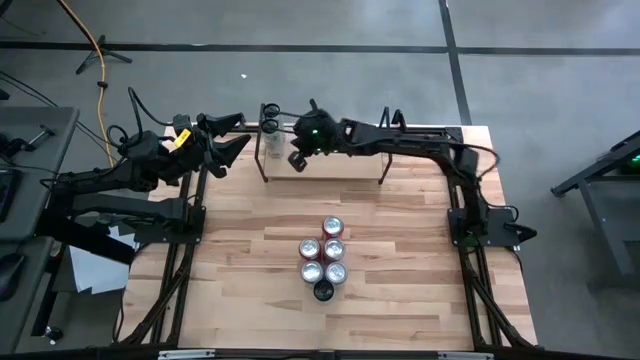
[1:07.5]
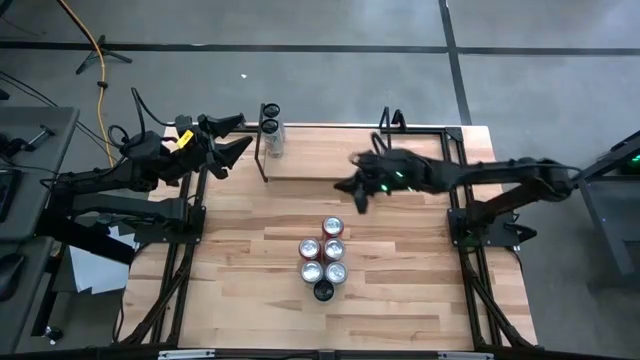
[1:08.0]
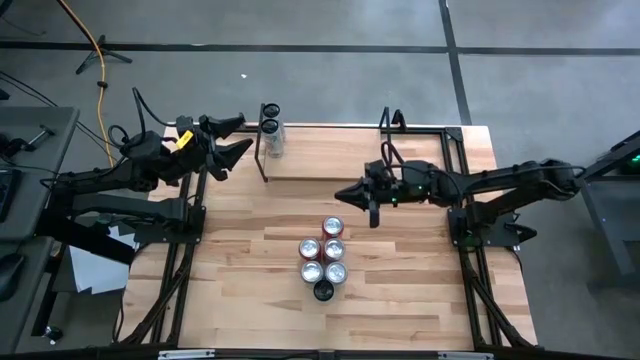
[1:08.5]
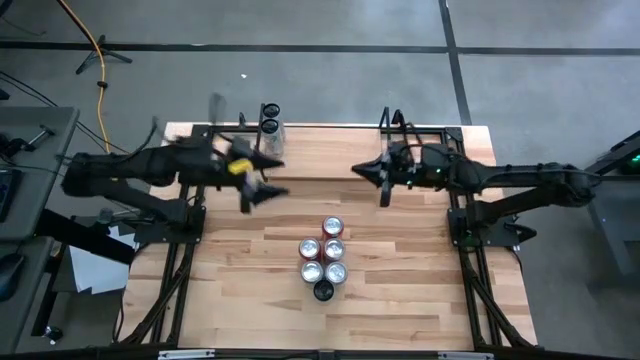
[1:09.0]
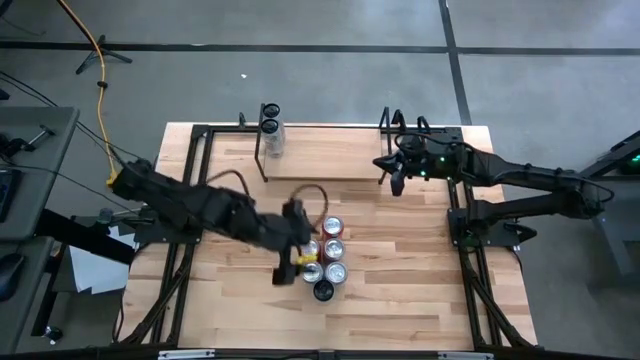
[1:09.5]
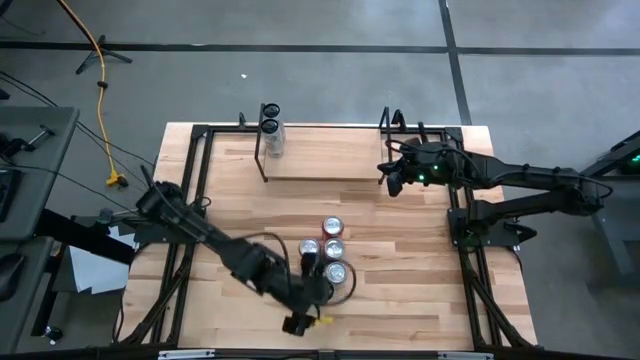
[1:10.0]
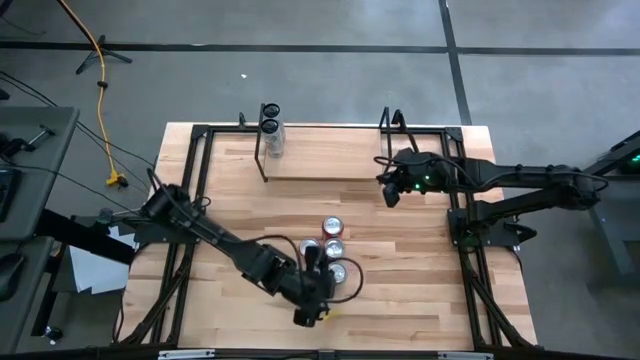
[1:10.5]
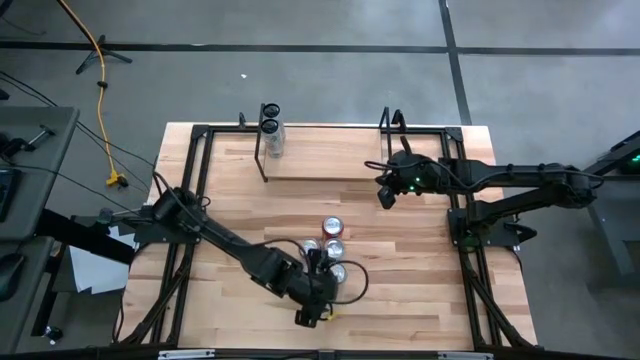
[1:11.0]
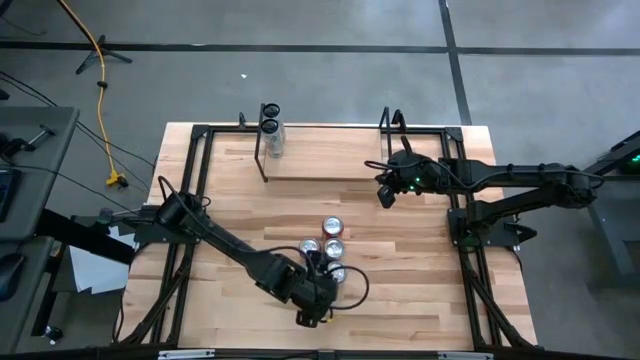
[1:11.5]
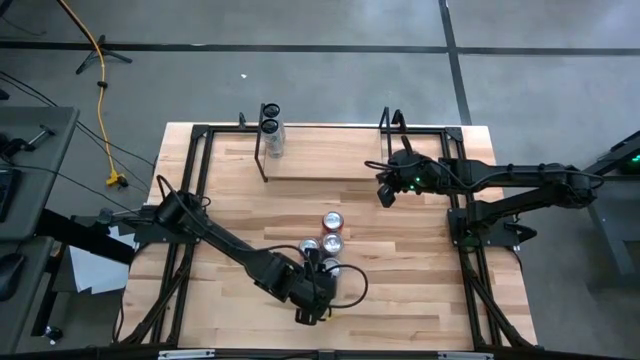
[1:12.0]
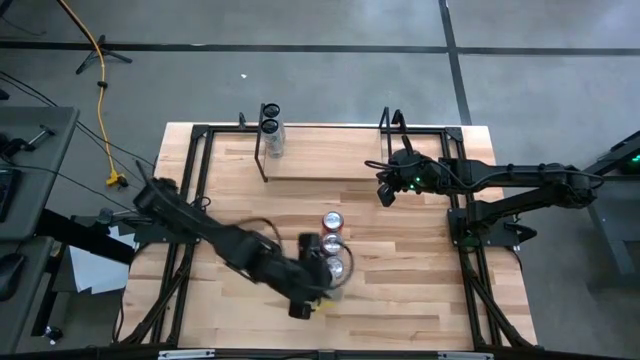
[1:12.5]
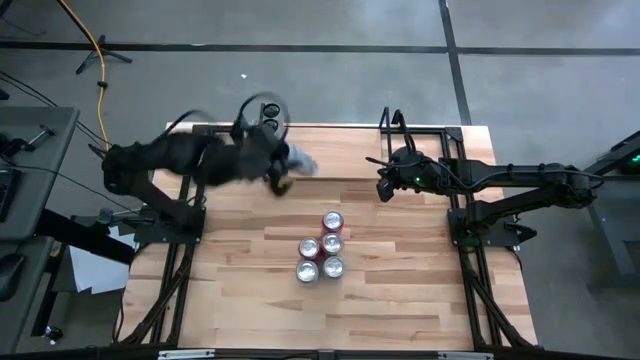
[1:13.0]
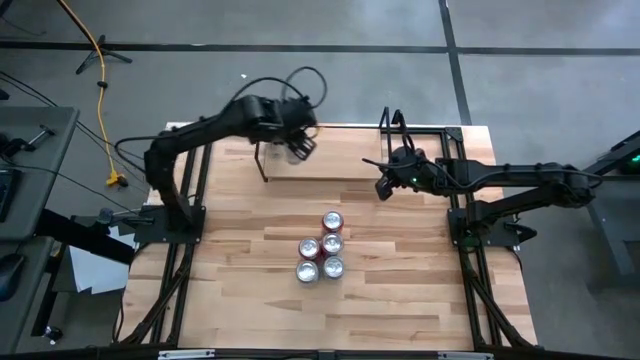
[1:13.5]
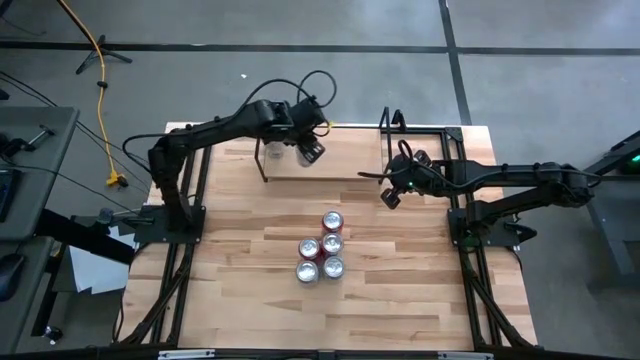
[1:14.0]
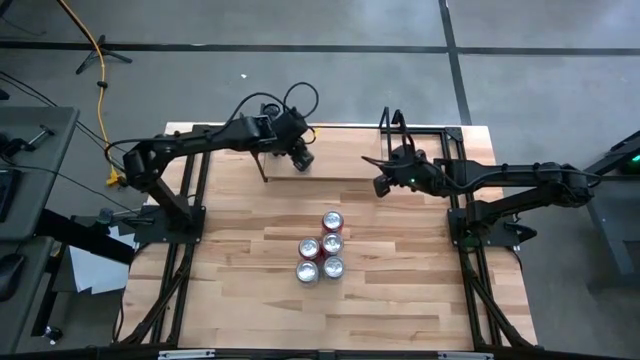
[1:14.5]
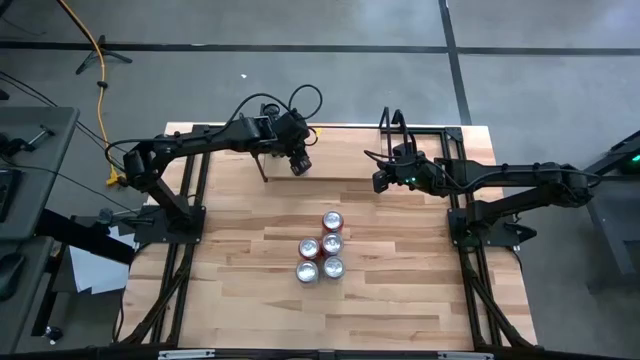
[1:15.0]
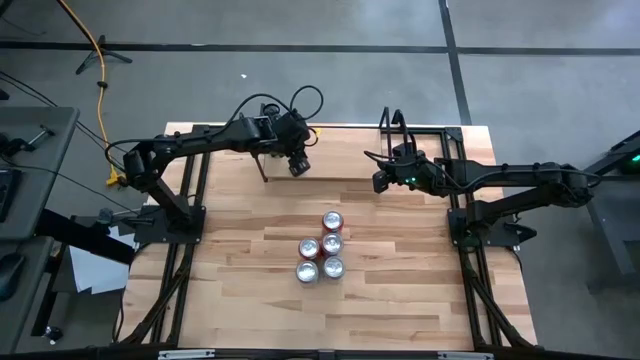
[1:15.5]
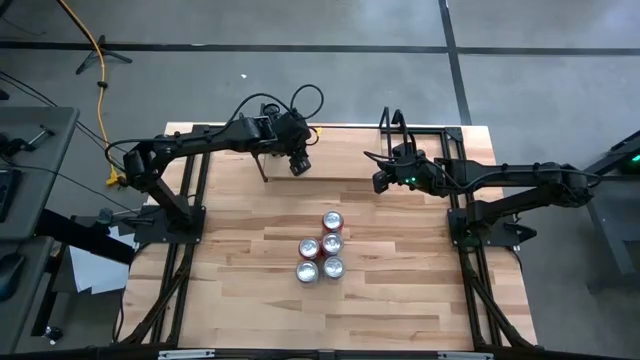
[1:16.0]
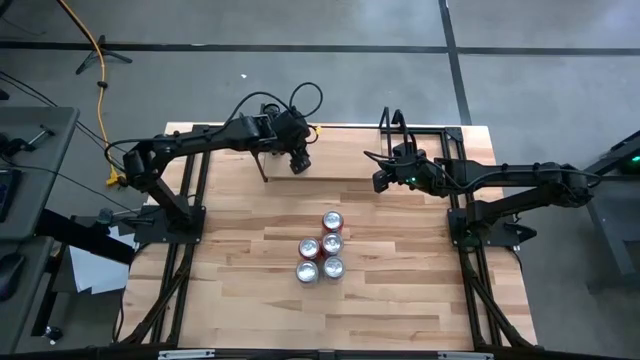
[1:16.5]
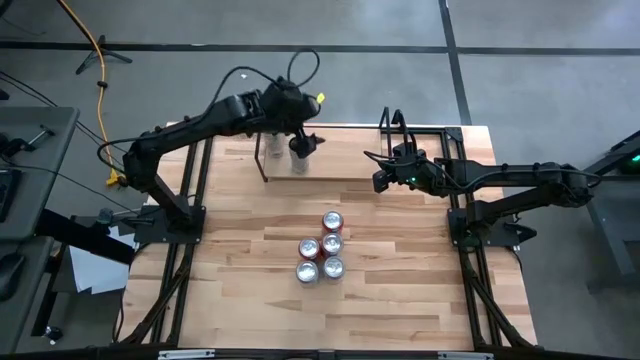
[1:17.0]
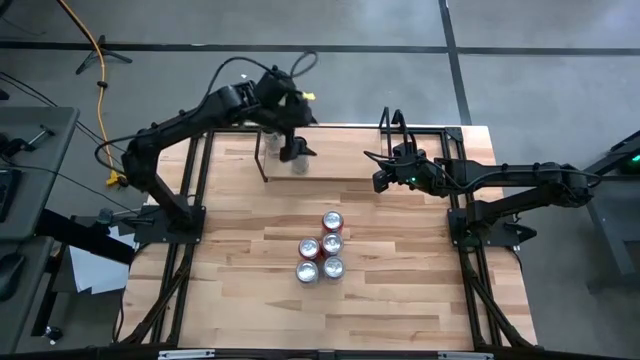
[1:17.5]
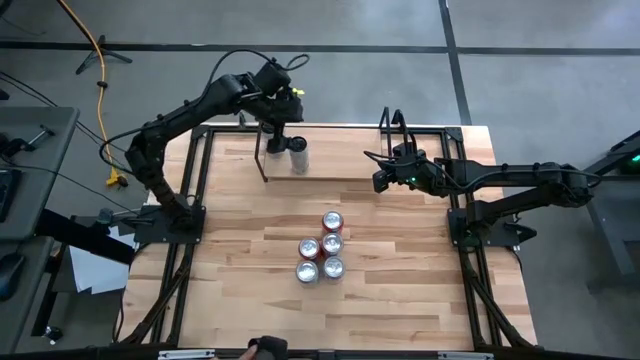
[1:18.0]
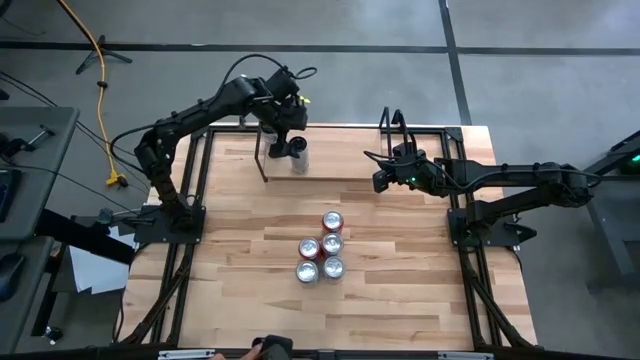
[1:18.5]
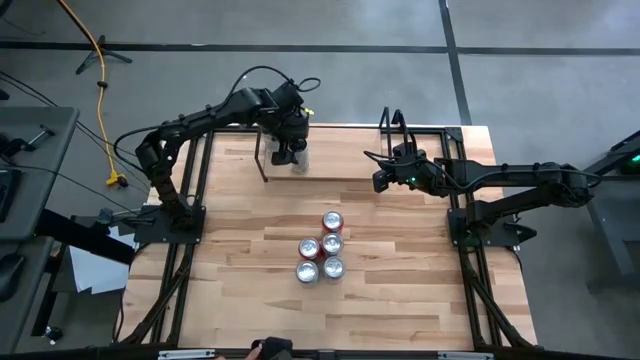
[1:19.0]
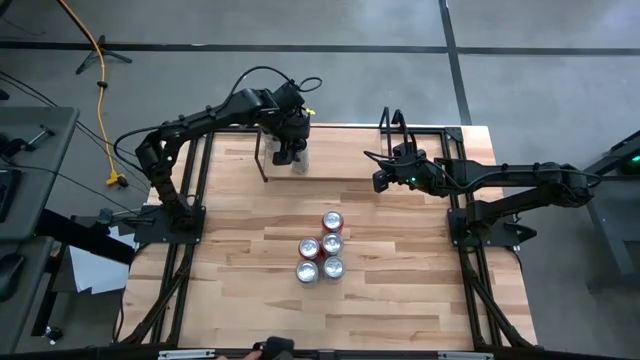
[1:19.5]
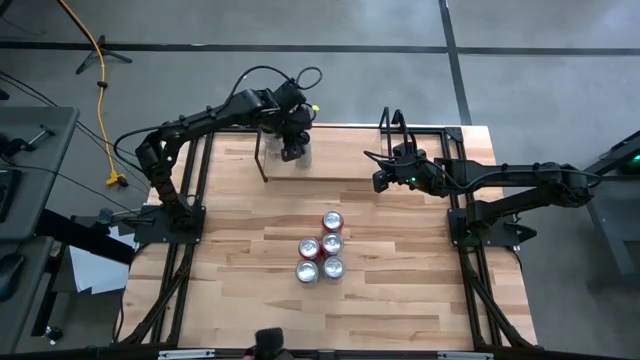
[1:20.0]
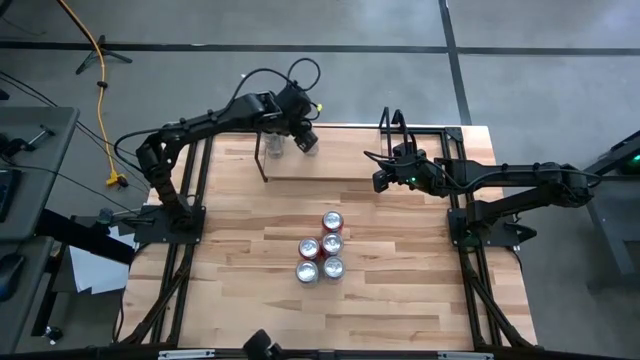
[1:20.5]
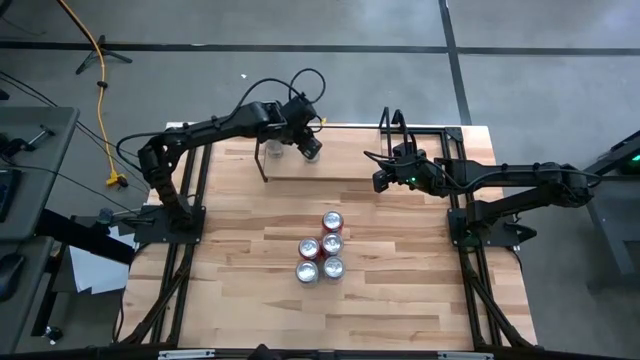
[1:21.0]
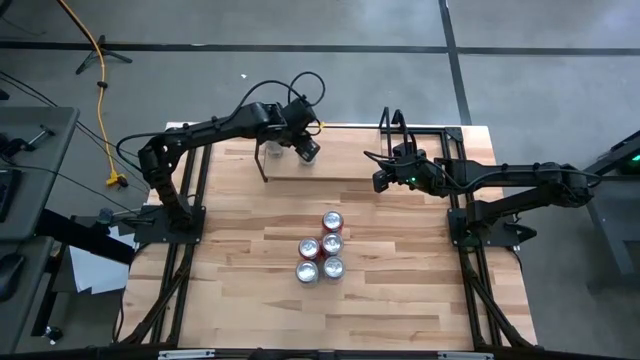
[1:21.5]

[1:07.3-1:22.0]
Task: Place canned beverage on shelf
Put the white soda can aligned with the other white soda can on the shelf

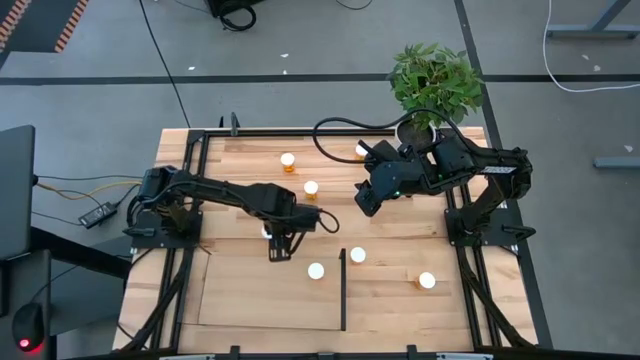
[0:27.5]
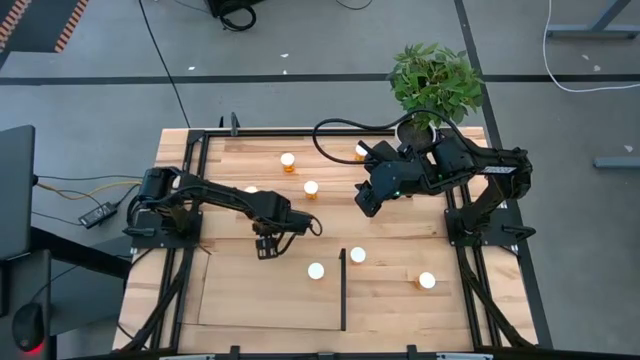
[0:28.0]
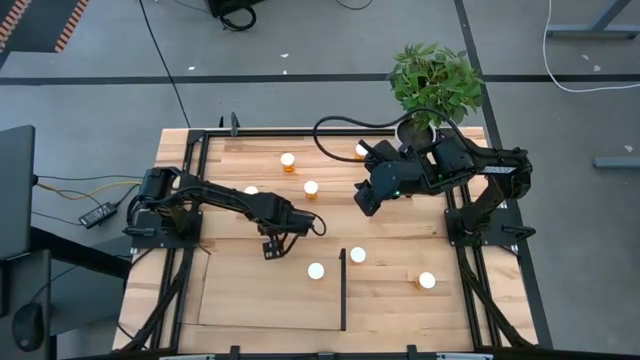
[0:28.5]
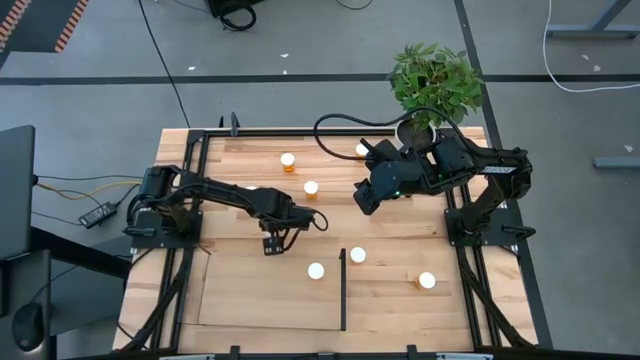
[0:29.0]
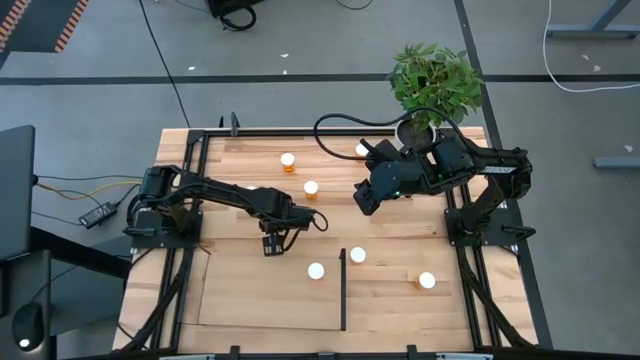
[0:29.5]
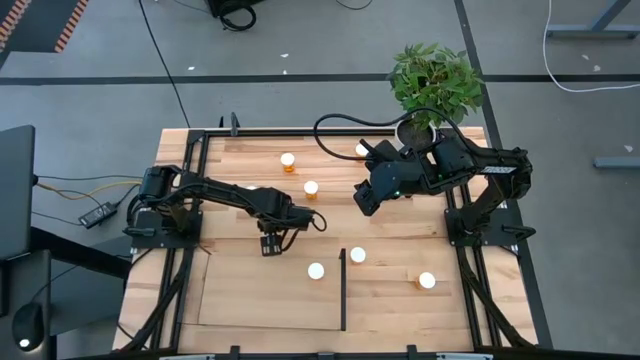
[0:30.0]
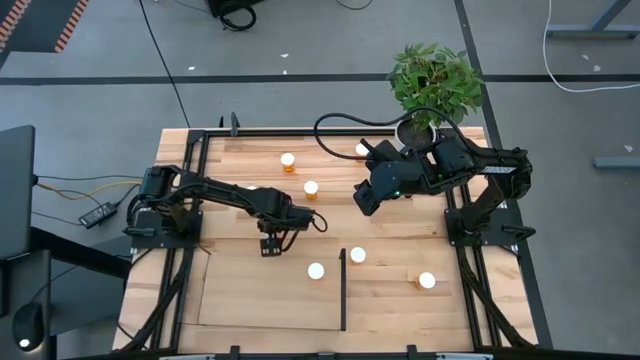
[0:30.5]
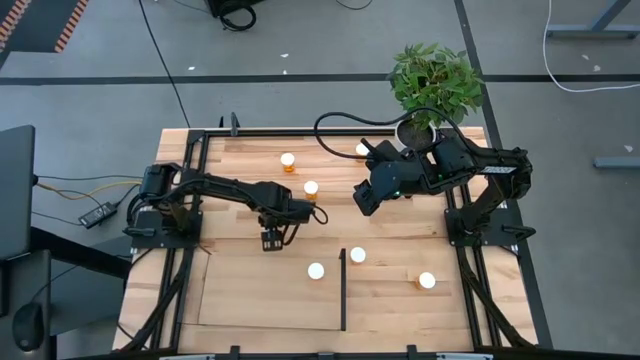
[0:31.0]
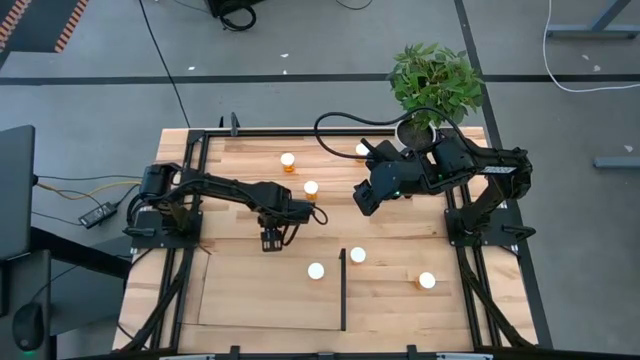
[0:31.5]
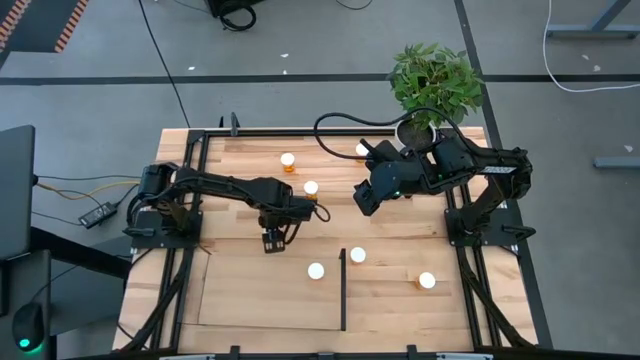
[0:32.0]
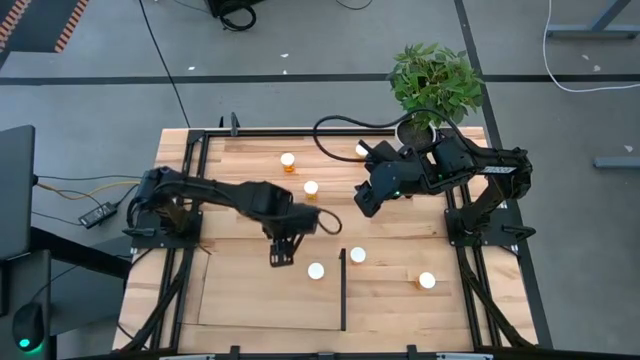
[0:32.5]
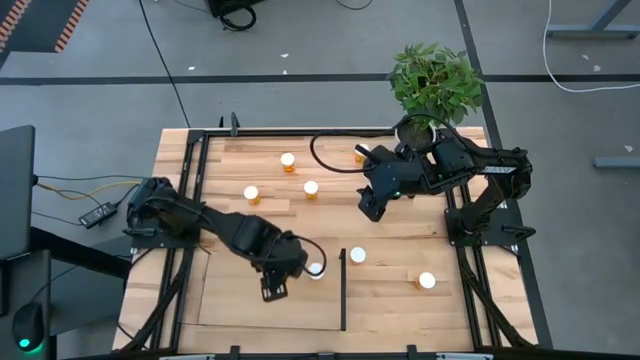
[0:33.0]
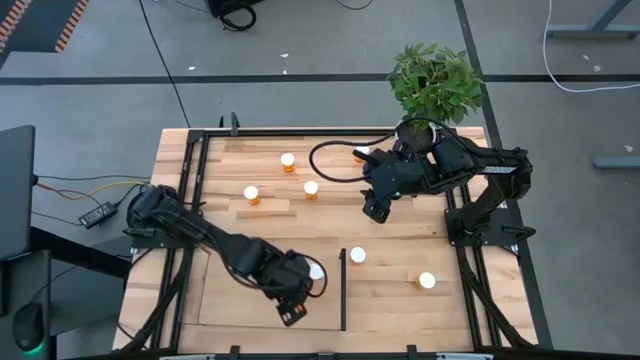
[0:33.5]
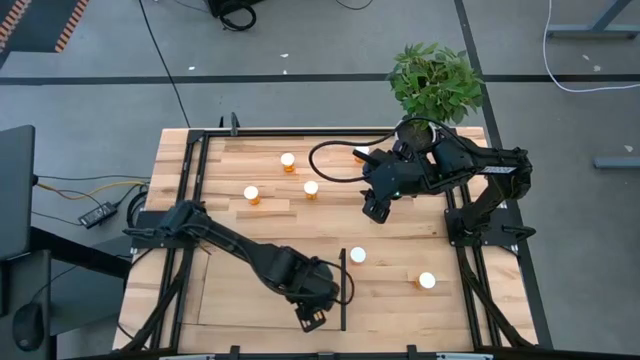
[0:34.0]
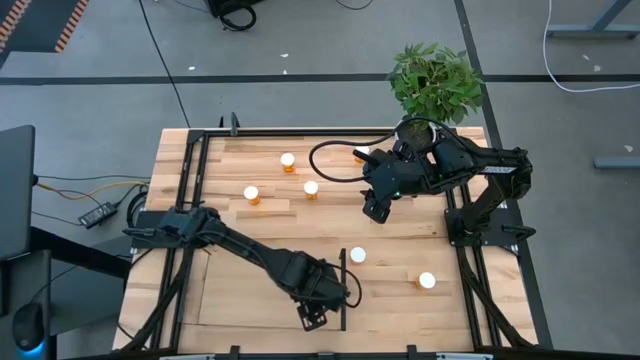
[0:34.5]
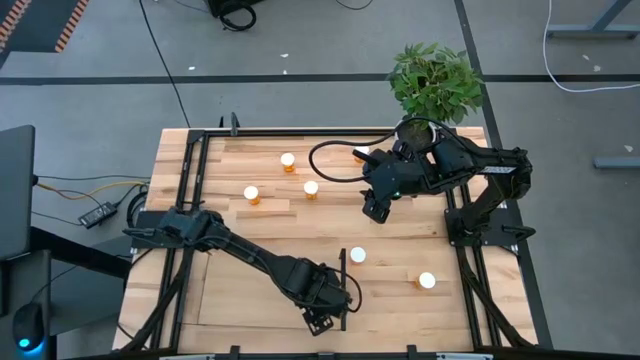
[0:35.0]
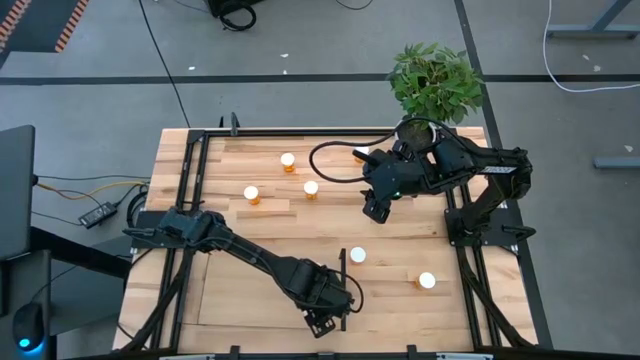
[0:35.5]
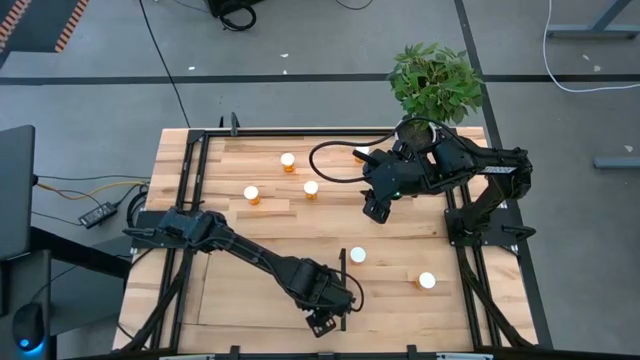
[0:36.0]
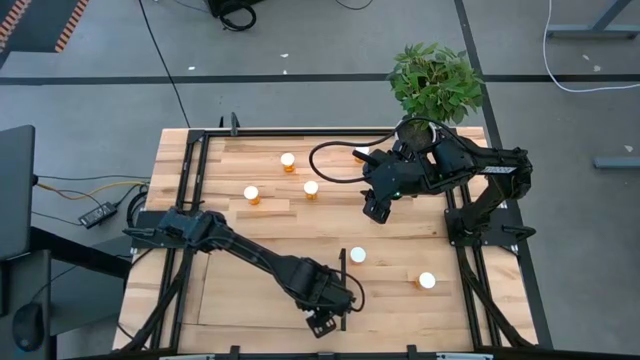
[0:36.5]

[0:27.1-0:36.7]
Task: Pick and place medicine bottles onto shelf by color
Align the orange pill bottle with the other orange pill bottle on the shelf
